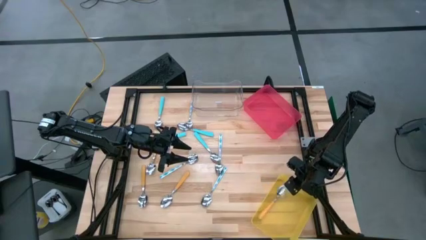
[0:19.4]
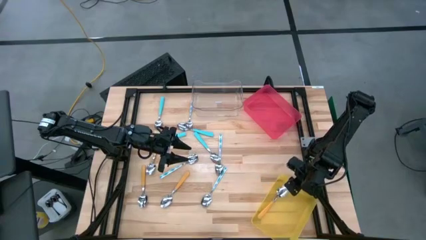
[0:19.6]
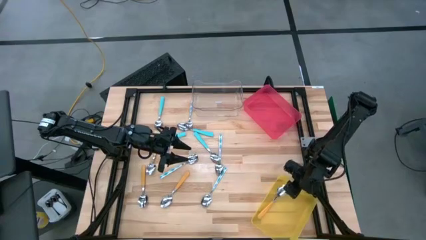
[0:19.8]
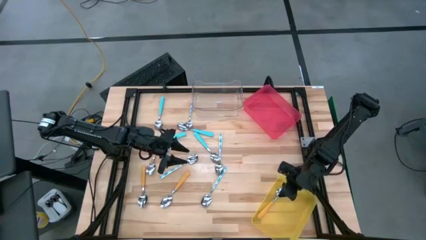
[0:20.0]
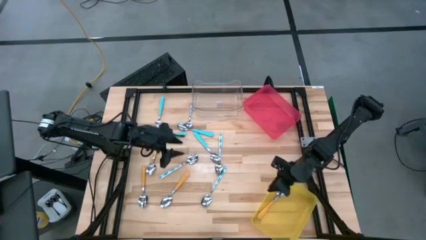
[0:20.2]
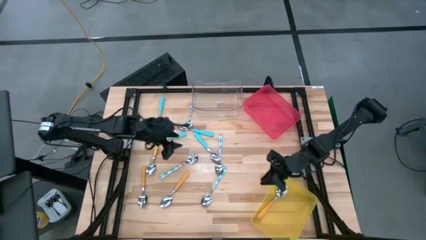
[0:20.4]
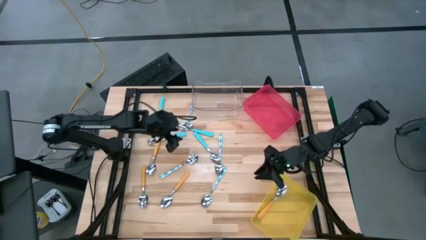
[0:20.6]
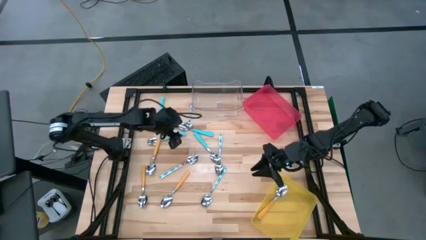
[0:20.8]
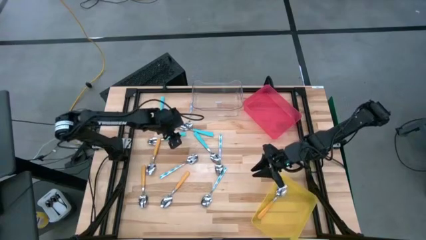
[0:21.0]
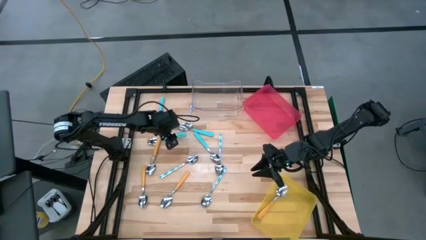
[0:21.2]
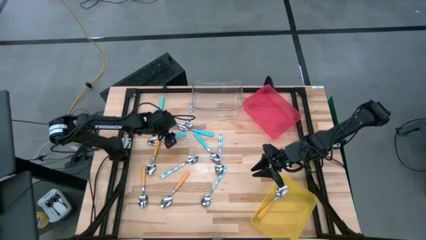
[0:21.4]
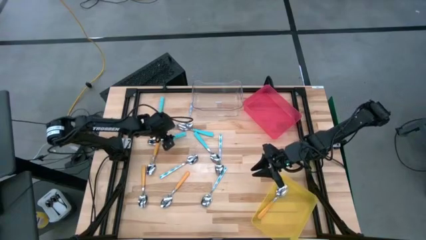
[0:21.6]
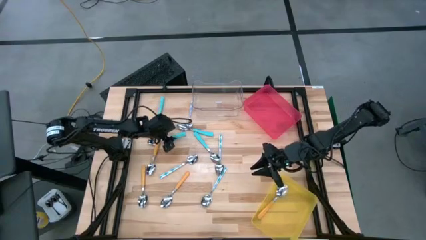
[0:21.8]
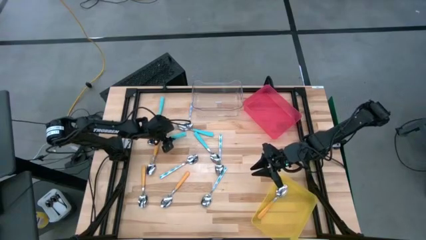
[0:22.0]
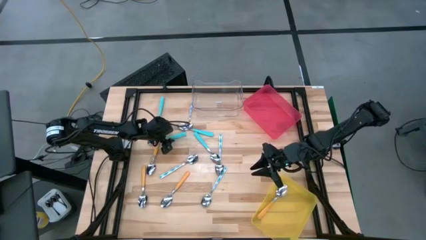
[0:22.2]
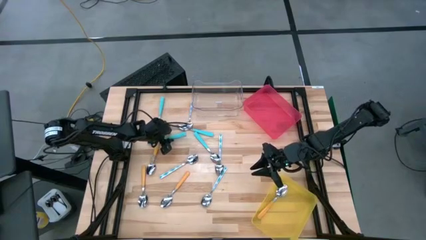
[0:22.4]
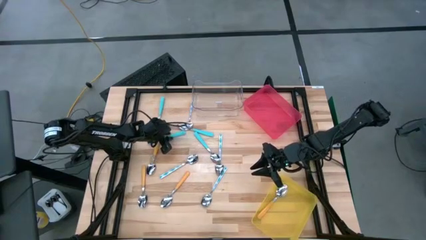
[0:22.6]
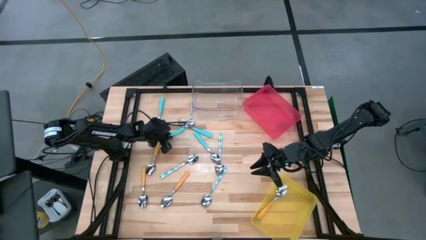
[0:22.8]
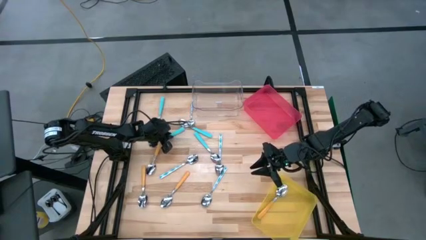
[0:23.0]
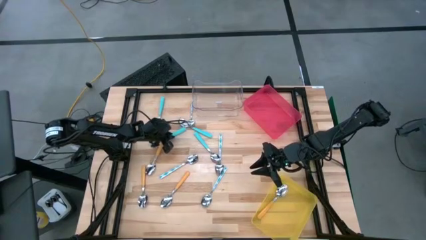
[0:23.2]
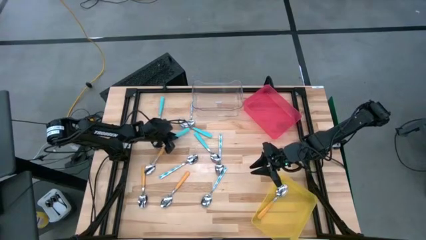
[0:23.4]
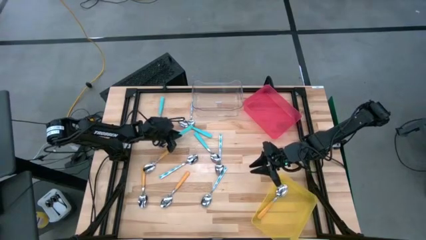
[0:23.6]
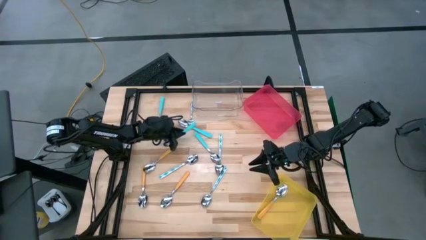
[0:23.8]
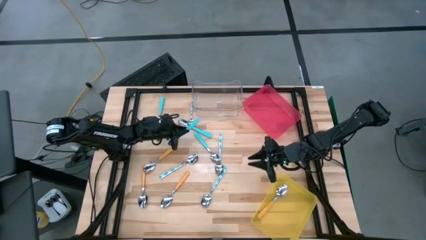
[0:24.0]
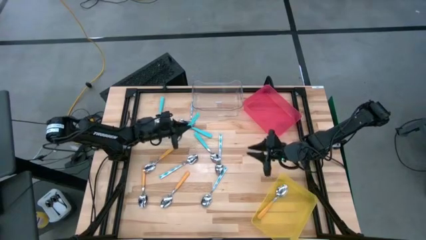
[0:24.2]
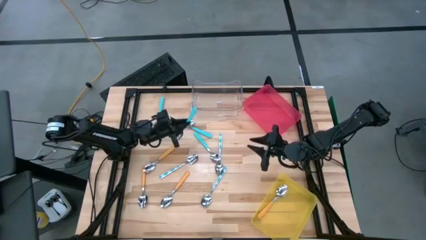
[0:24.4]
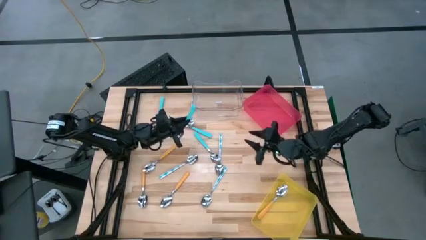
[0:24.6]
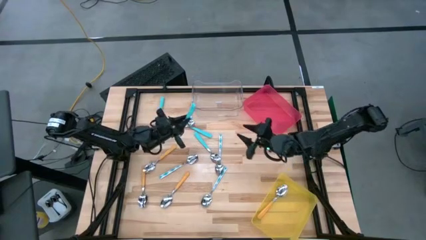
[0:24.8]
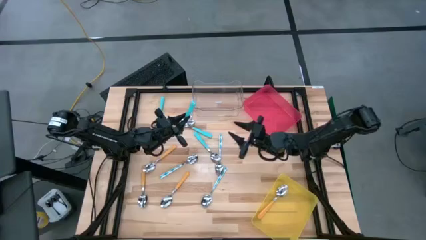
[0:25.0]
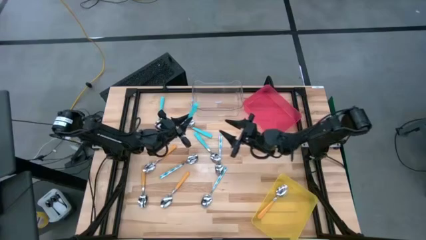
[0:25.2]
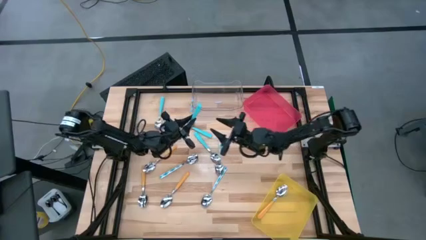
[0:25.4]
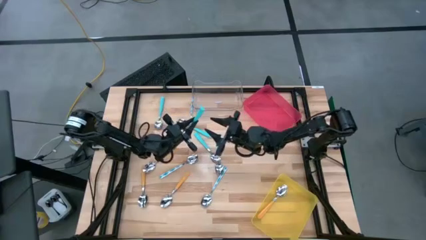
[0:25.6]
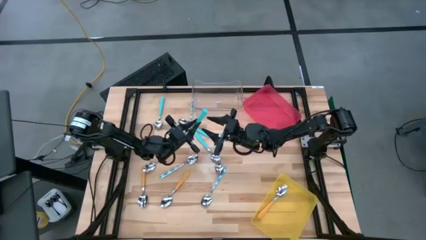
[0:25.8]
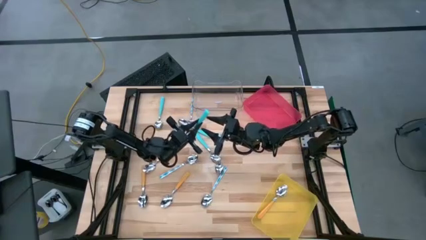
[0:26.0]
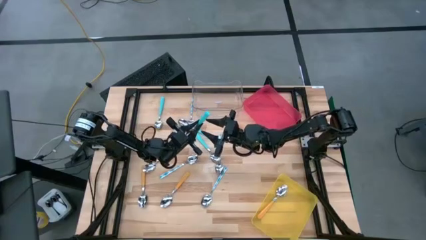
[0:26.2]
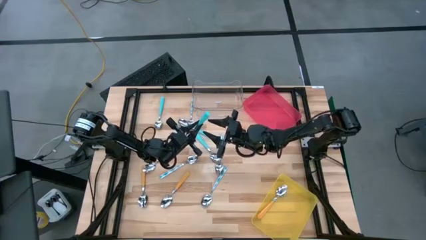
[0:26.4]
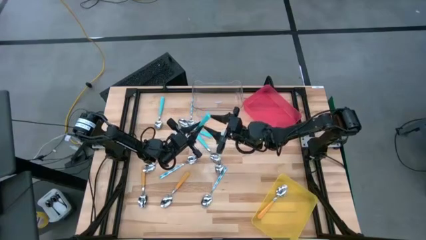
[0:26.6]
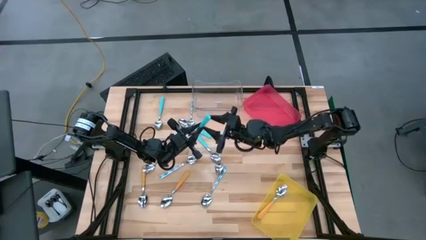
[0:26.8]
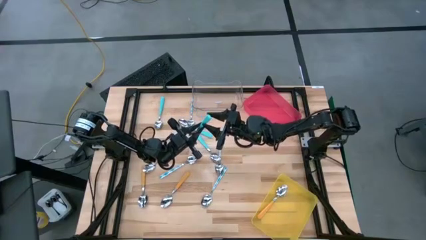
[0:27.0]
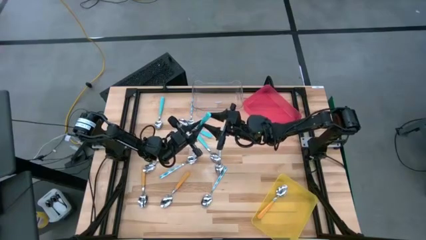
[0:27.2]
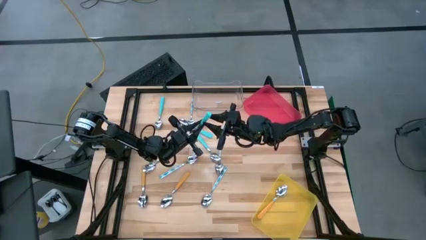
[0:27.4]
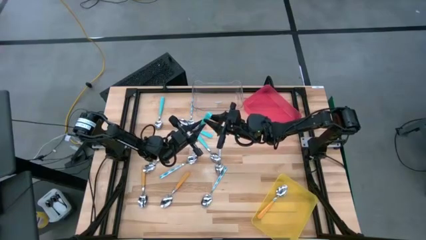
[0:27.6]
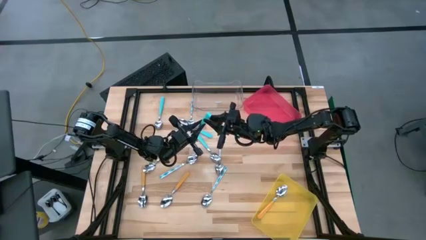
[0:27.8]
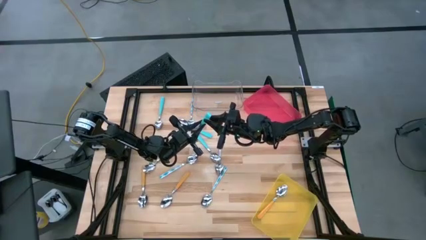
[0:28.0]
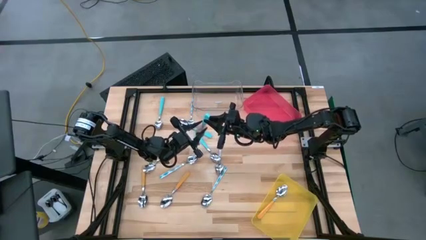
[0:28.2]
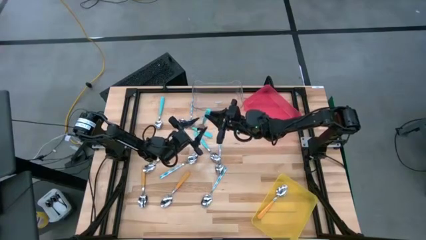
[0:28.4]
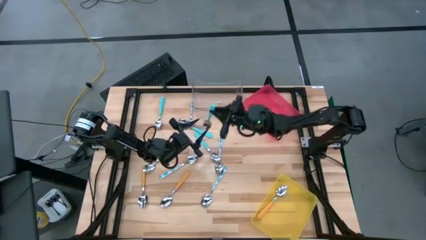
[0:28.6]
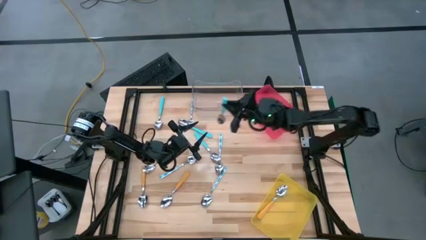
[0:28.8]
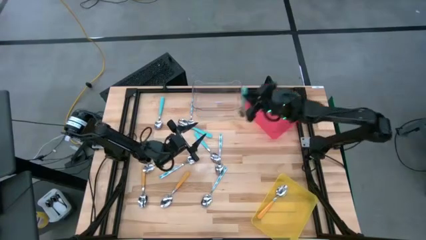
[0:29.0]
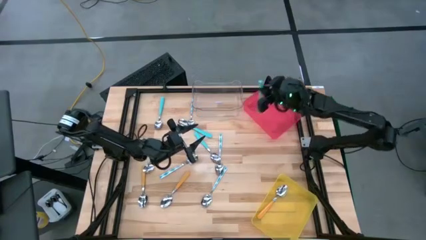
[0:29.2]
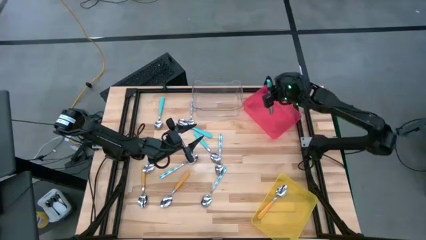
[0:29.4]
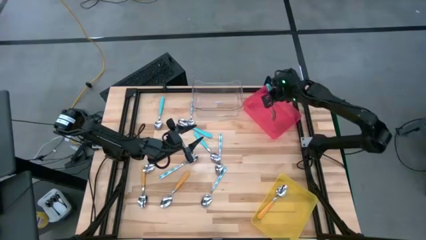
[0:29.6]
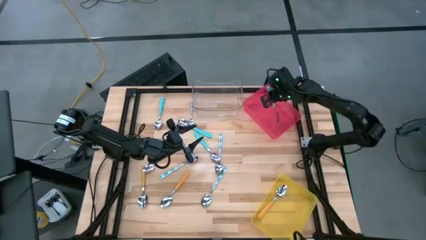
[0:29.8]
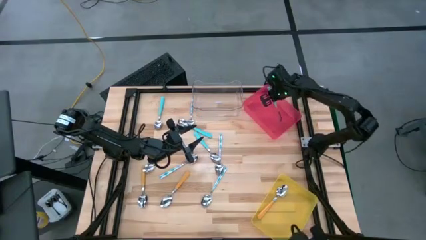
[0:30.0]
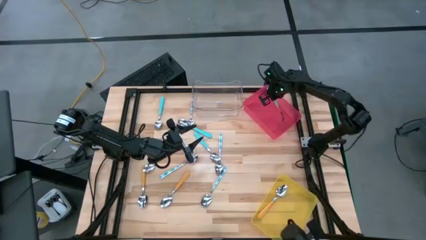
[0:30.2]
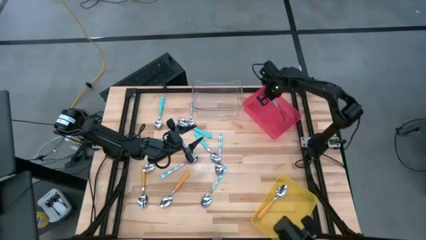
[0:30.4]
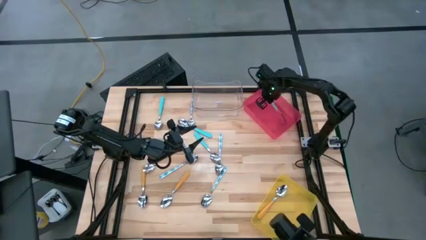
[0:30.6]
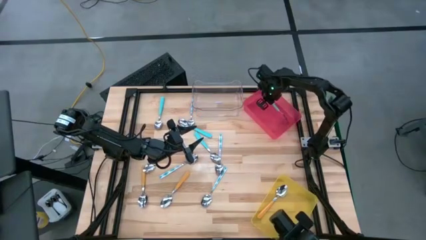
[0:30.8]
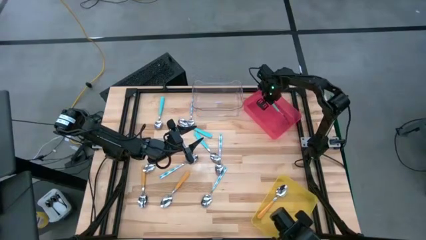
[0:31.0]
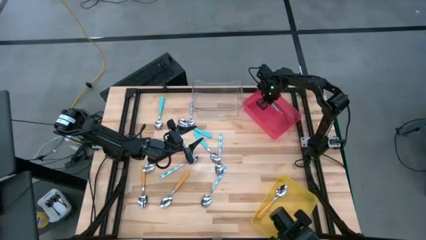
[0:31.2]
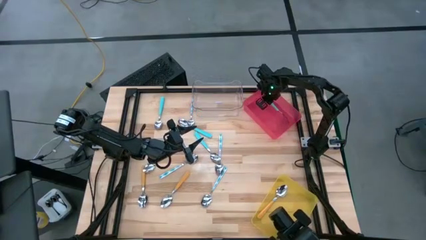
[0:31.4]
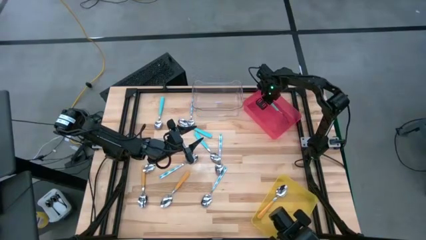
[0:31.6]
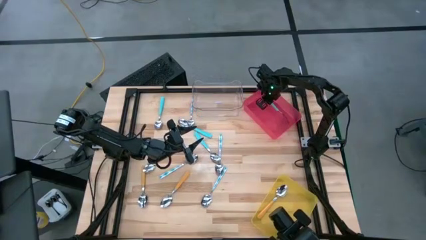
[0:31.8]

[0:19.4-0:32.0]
Task: Sort silverware by color (type)
Put the blue spoon into the red bin
